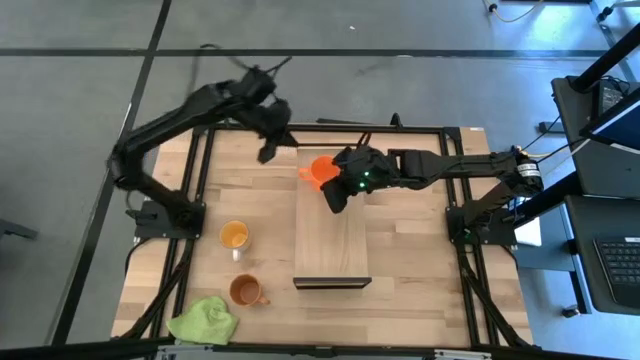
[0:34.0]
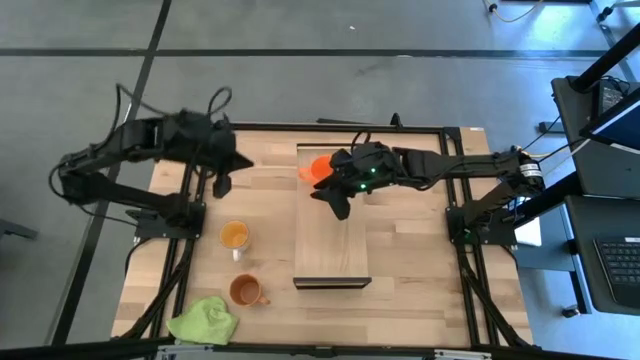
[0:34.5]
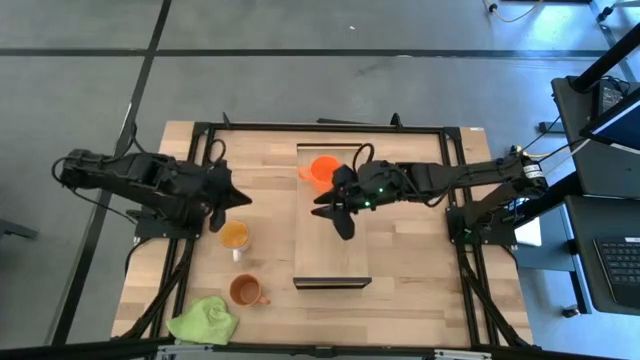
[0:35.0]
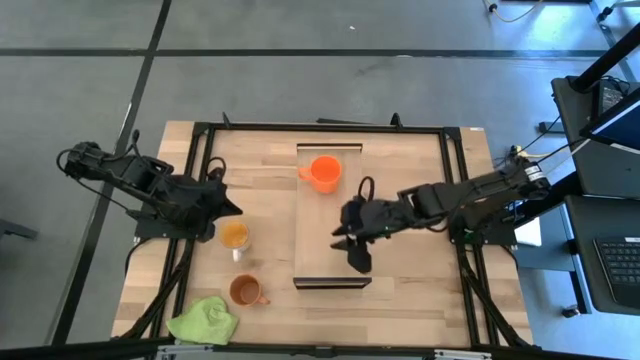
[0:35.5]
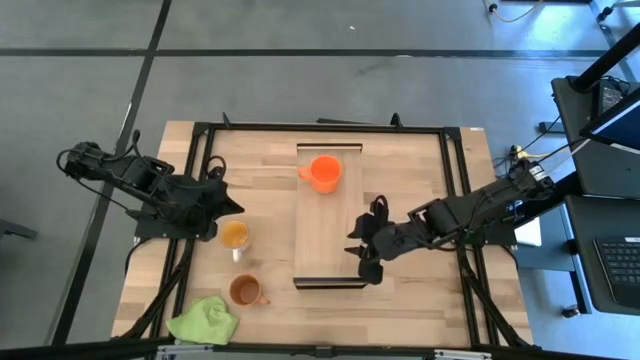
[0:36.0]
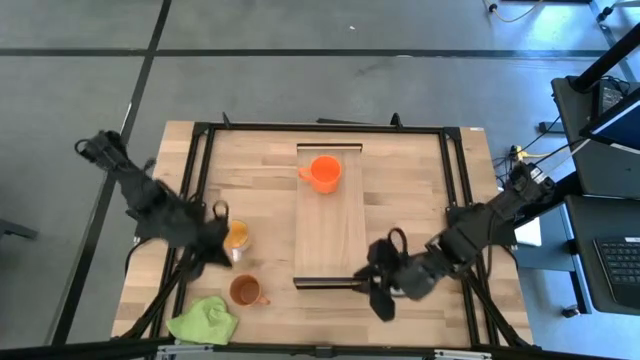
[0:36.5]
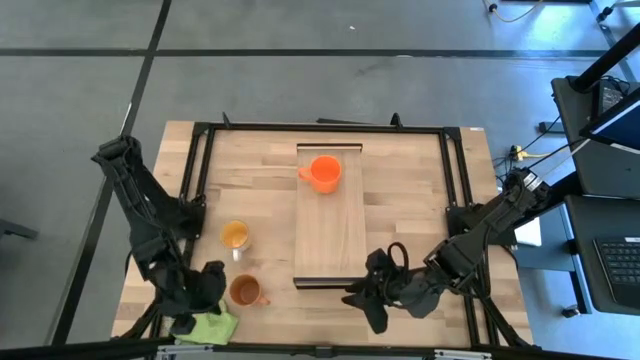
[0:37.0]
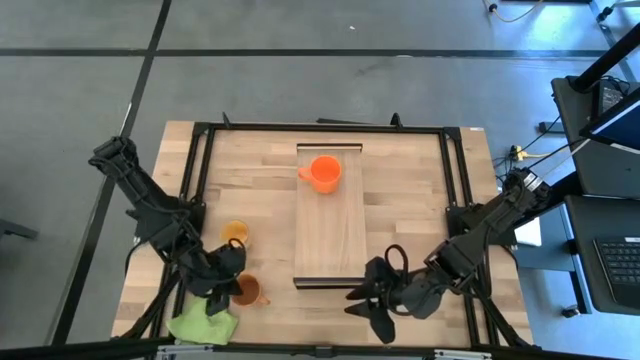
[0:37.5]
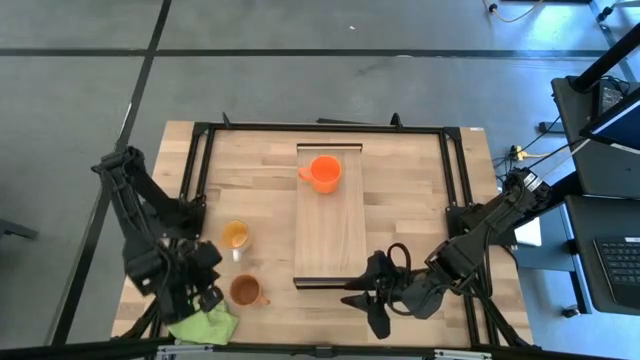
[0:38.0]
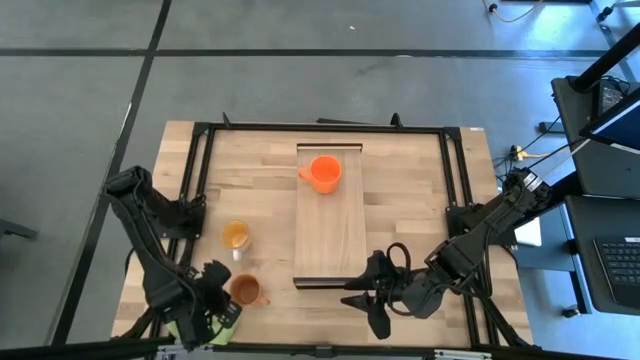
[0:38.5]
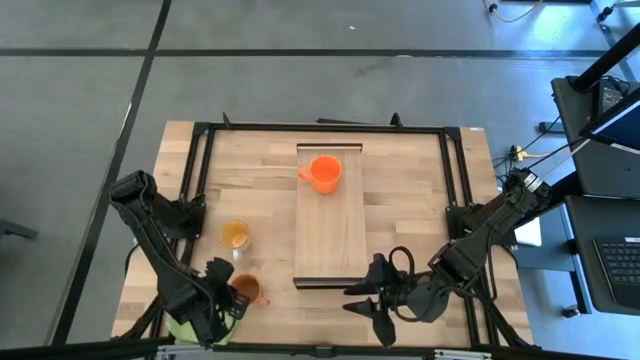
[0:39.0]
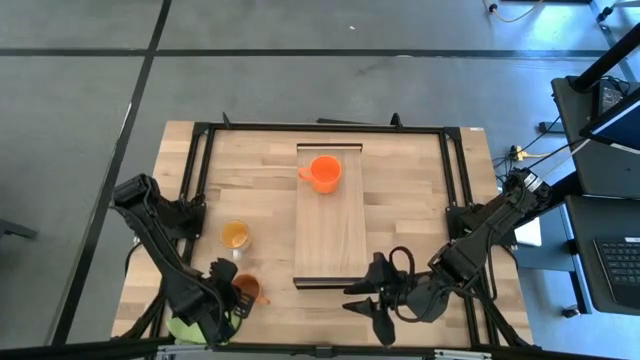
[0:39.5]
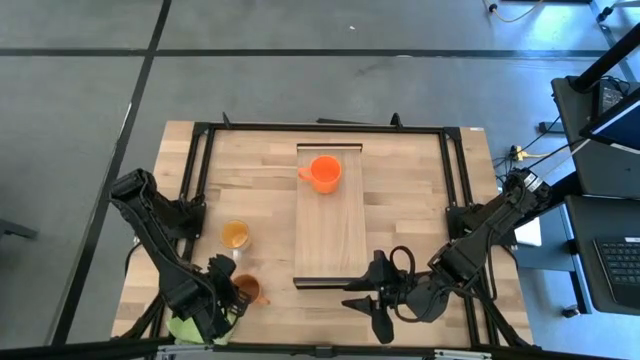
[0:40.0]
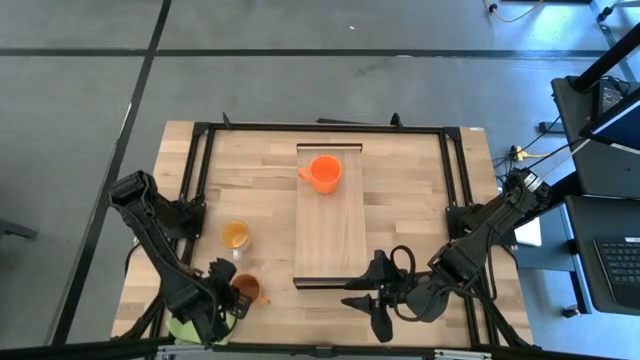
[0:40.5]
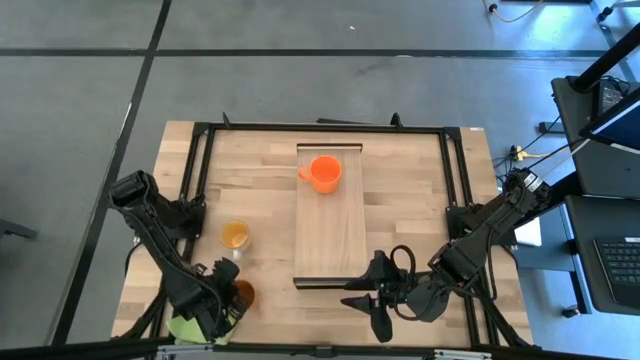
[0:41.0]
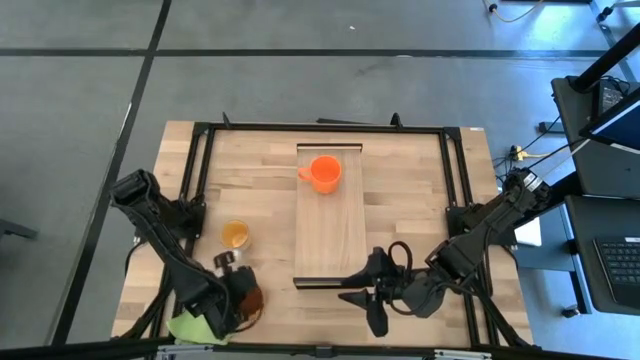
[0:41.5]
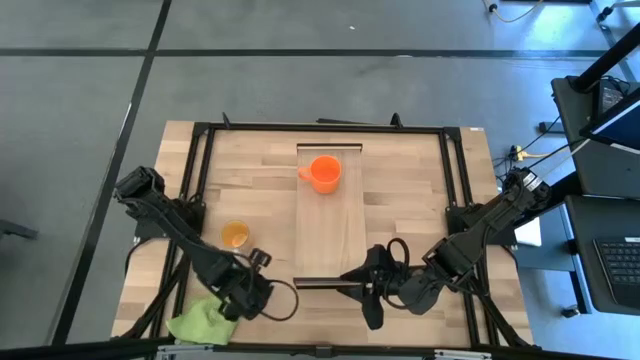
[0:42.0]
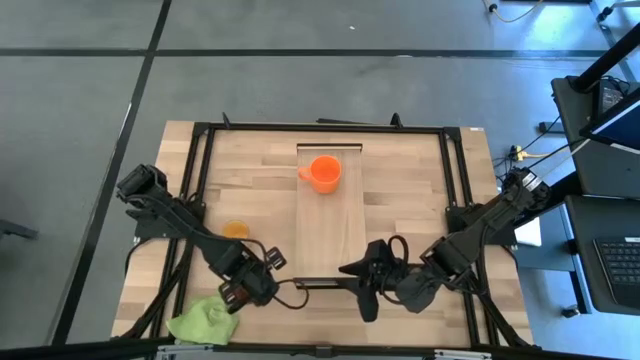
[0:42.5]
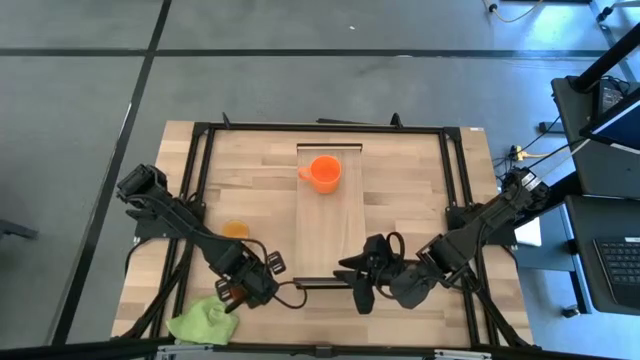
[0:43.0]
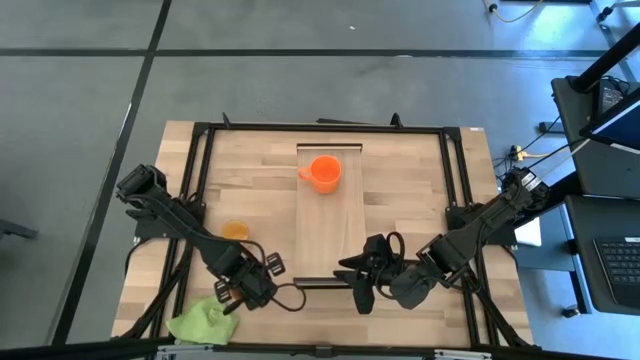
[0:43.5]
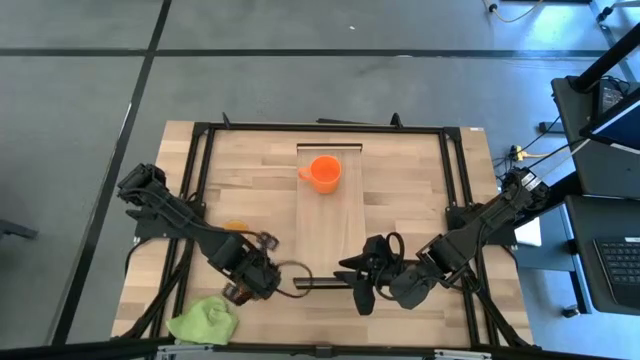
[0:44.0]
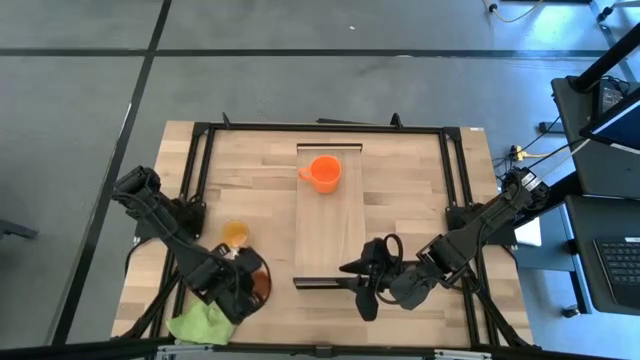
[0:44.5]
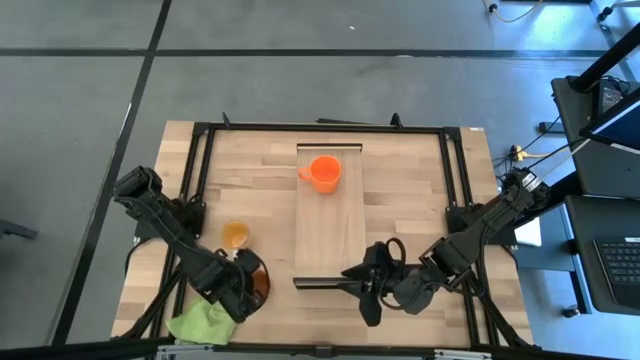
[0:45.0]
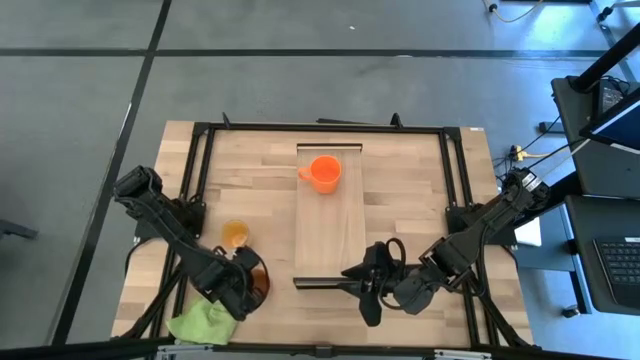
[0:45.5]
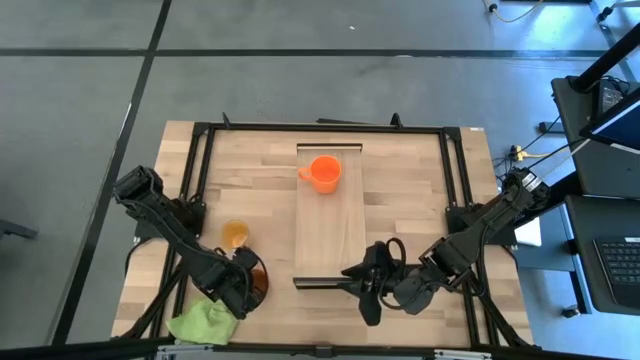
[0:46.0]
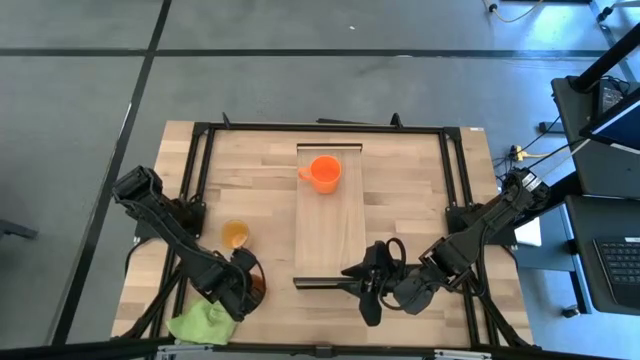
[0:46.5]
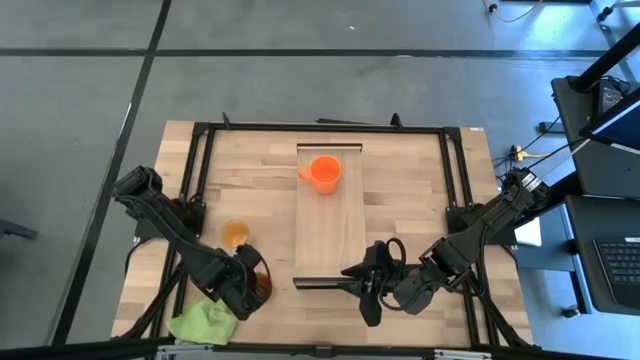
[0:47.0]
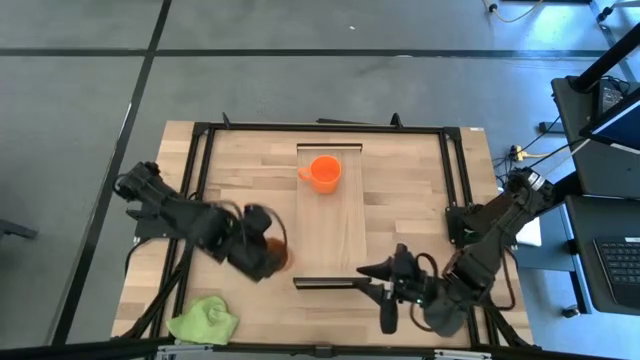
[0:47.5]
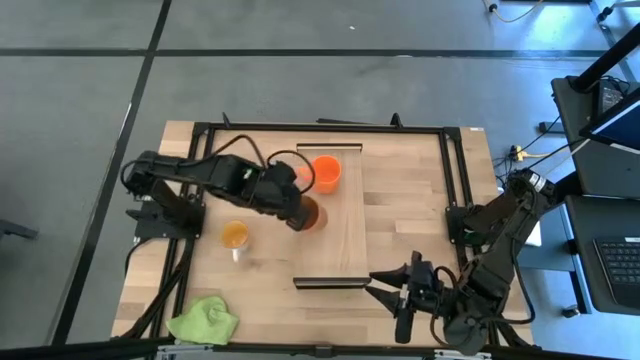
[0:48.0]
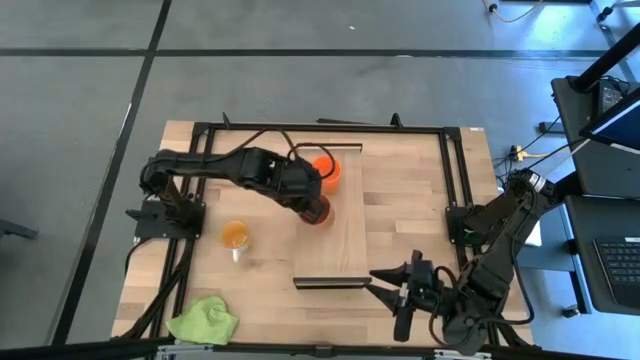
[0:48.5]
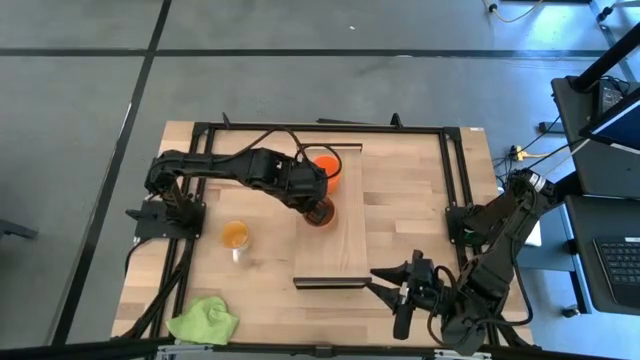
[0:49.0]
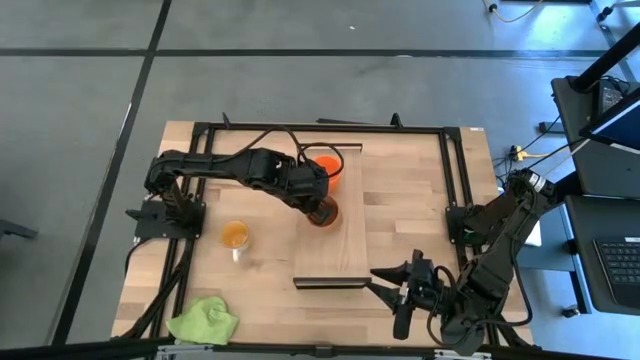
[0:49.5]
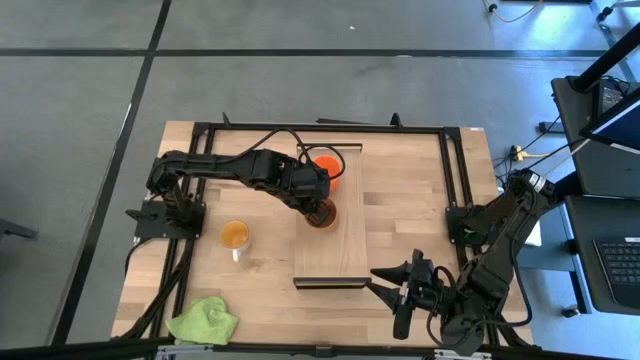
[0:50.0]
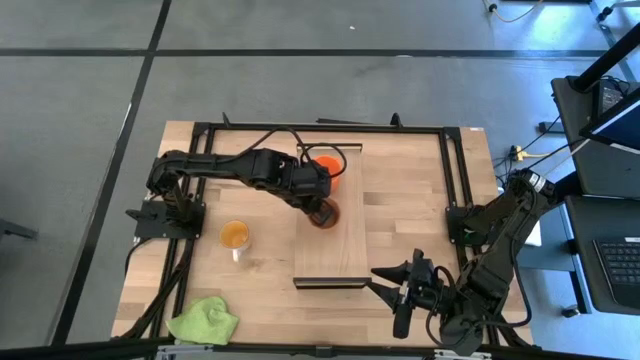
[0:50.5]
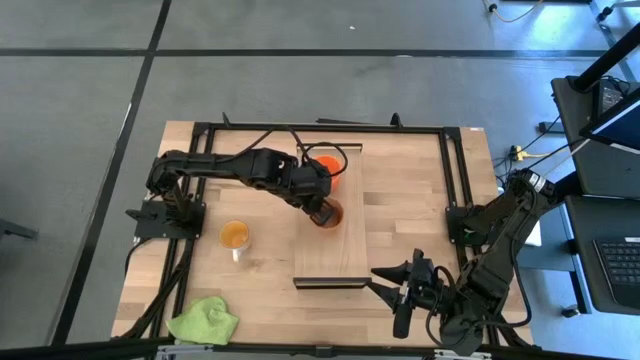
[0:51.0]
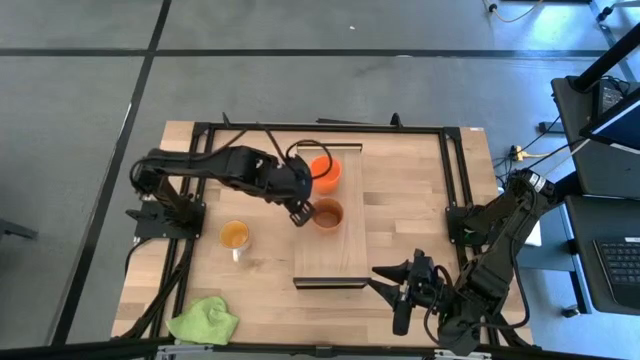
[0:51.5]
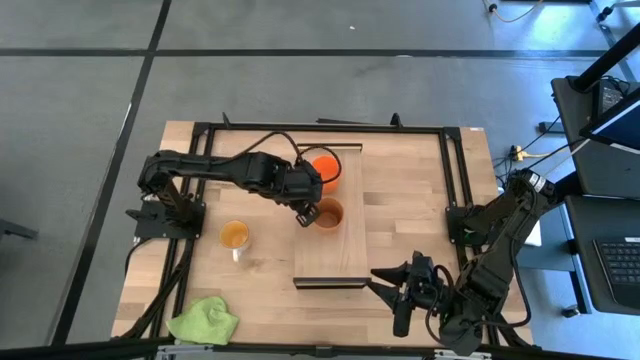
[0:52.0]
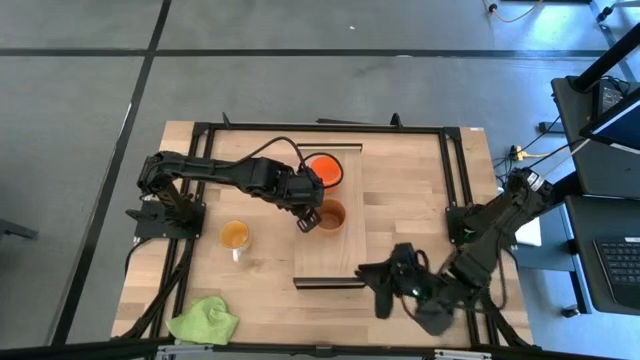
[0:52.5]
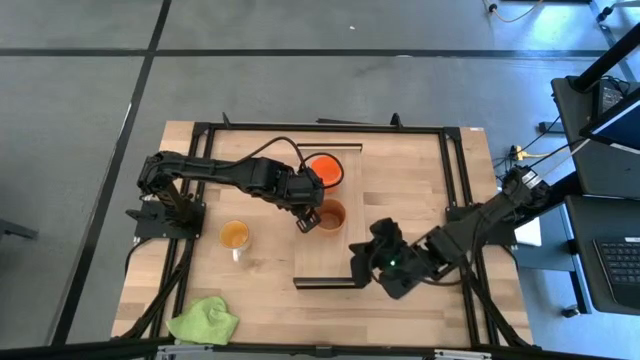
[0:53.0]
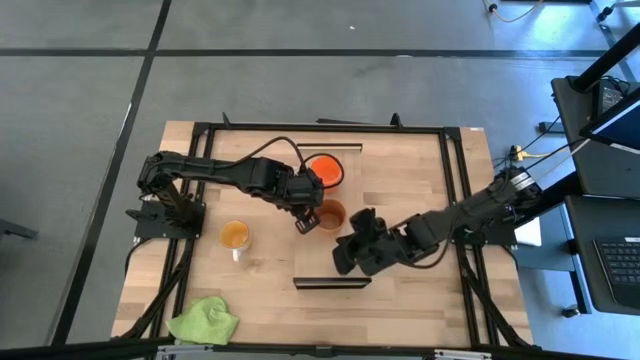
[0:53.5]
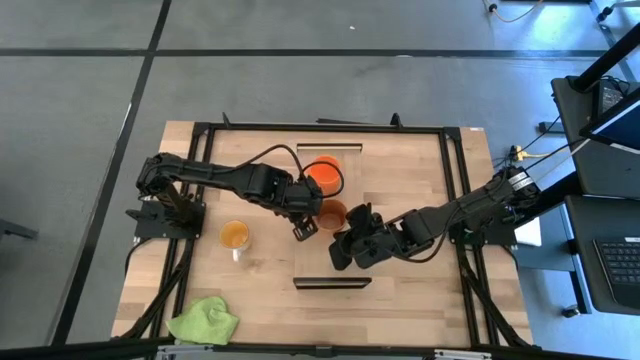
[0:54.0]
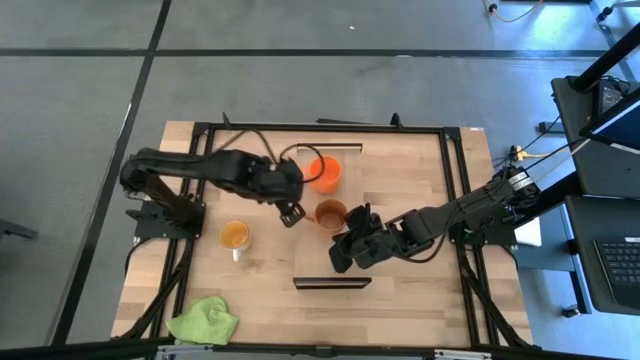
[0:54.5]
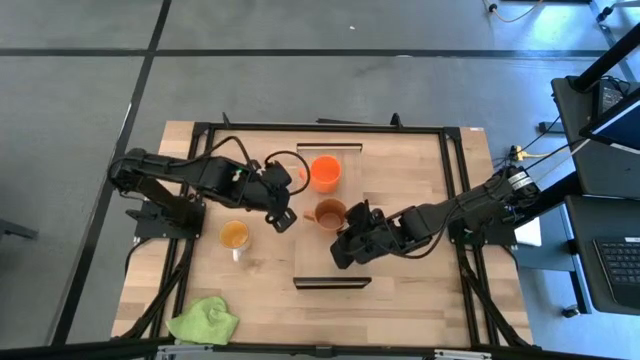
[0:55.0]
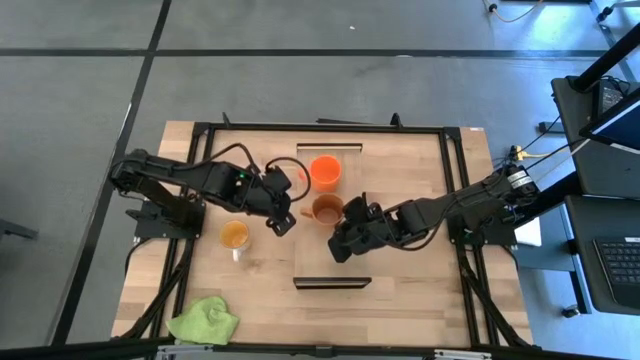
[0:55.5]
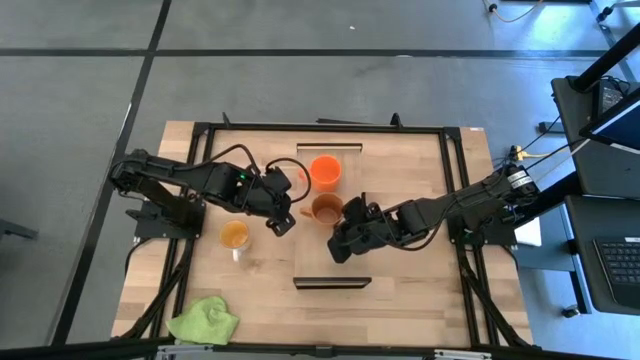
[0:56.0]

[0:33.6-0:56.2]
Task: Stack small to large cups/mugs on shelf
Put the brown mug on the shelf
